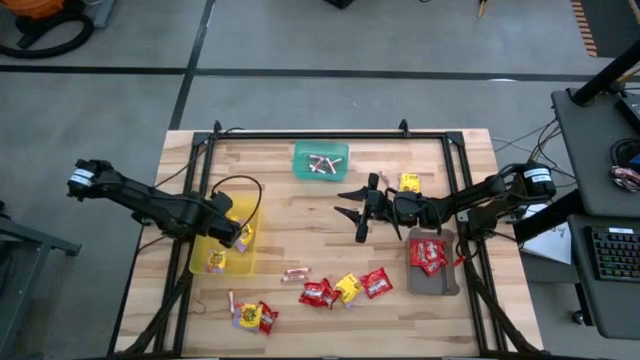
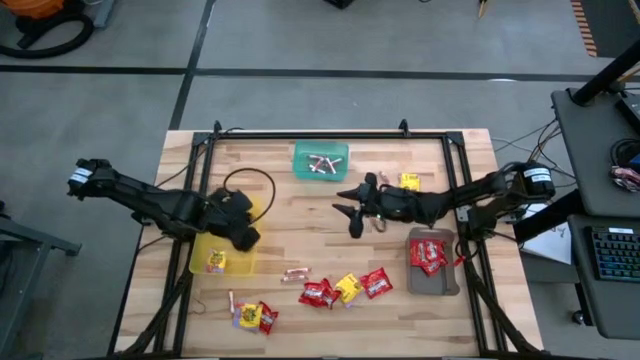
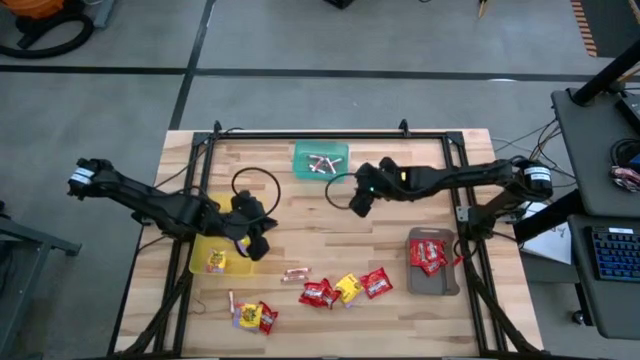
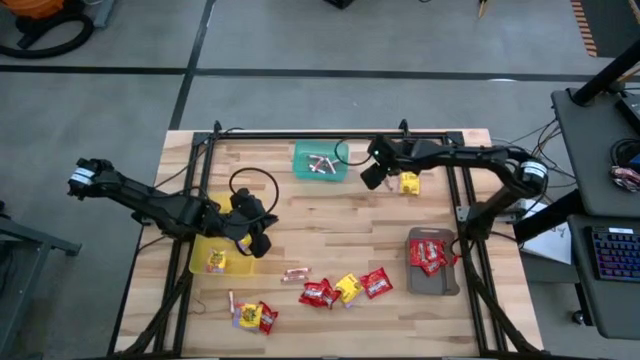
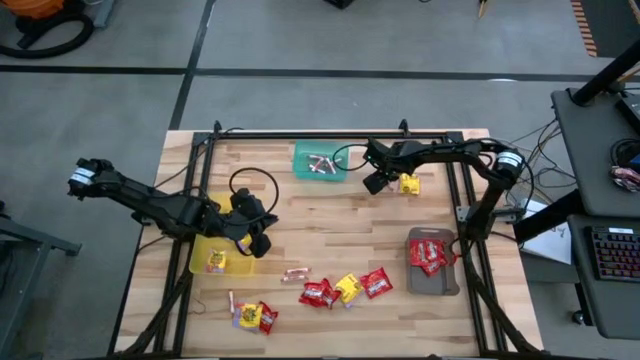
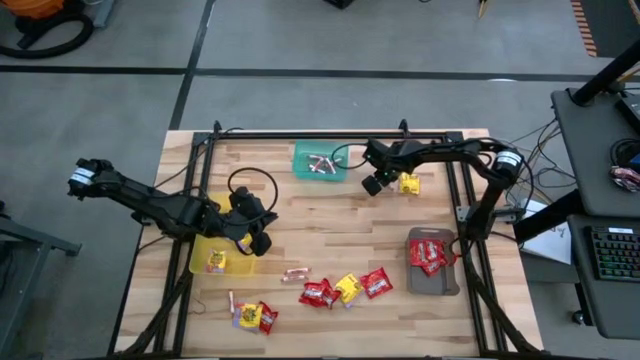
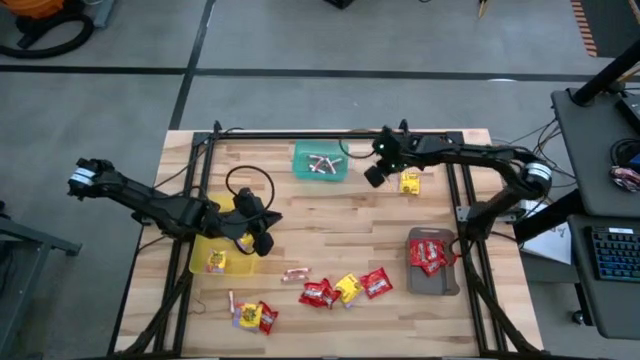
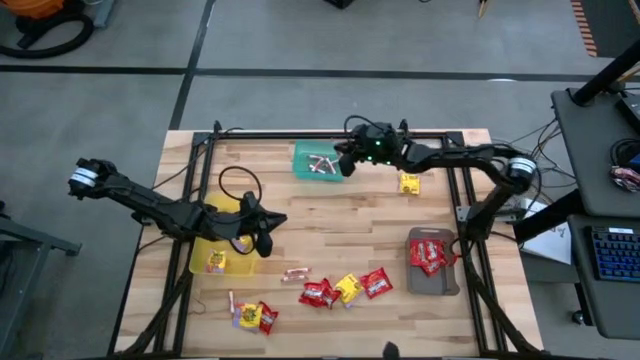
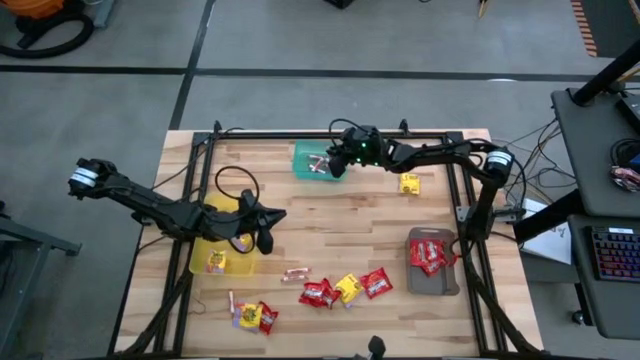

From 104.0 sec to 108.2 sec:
Task: Sort candy
Put the white candy into the green bin

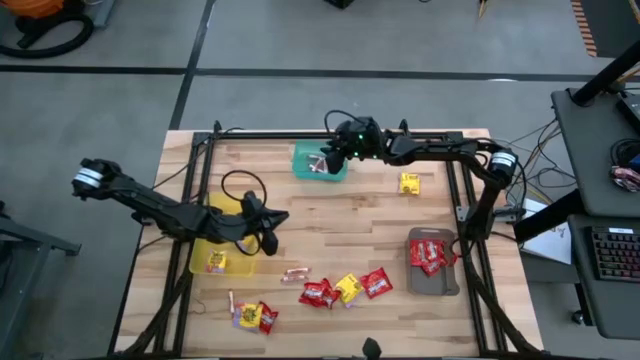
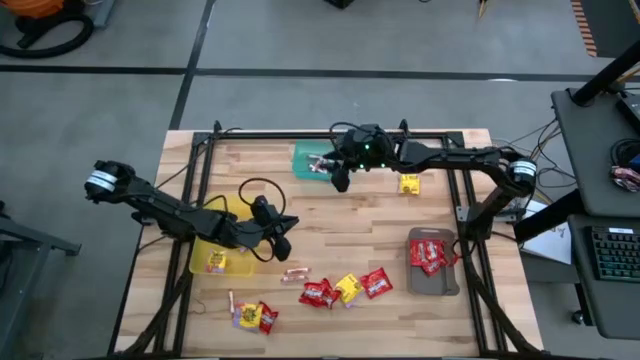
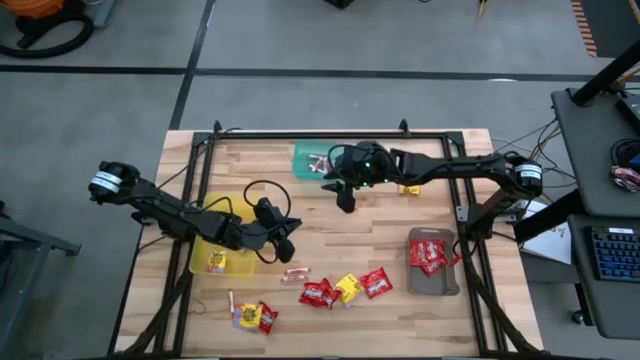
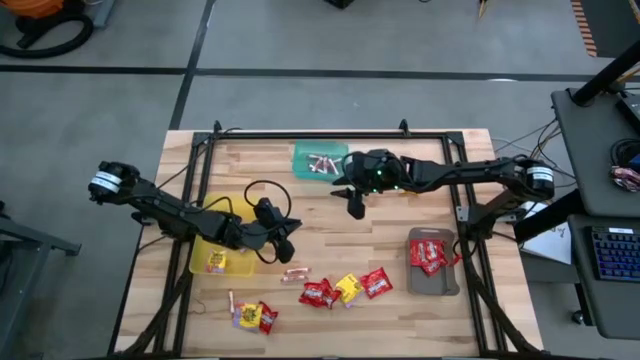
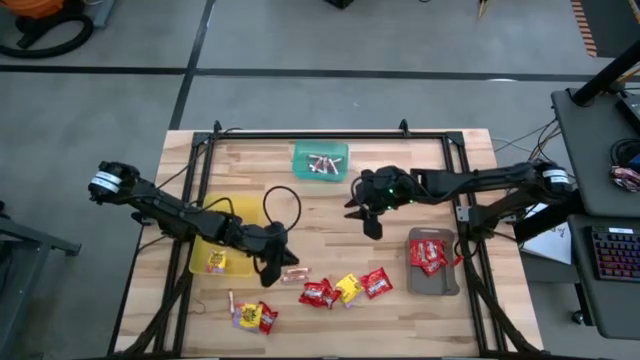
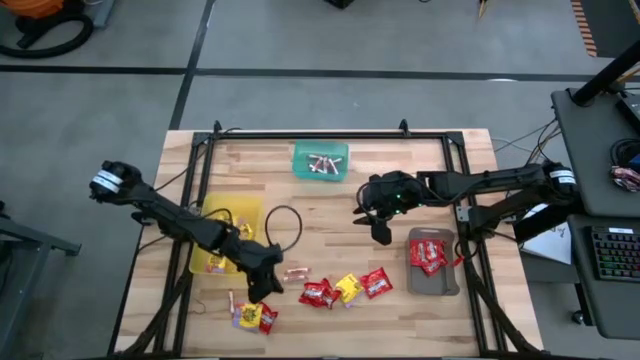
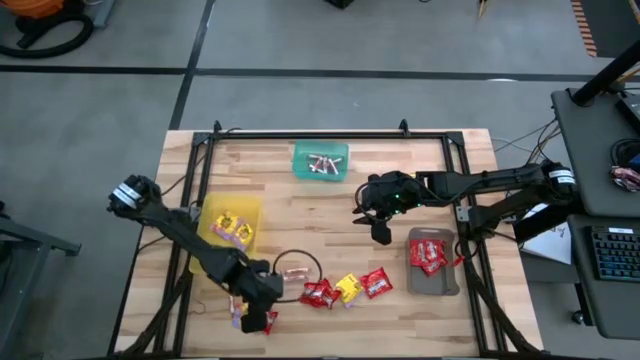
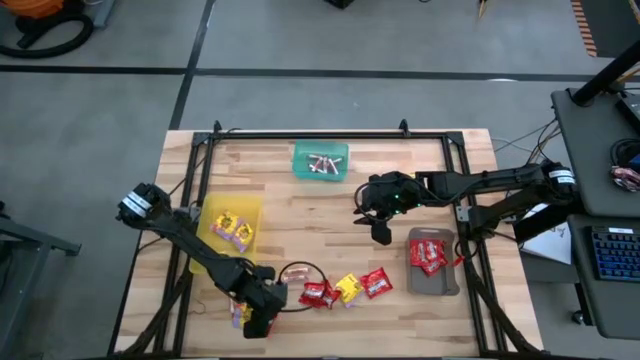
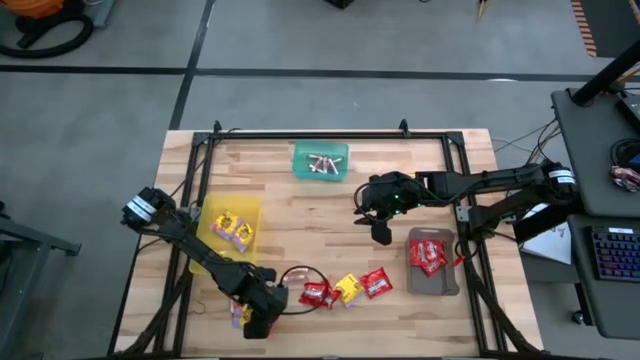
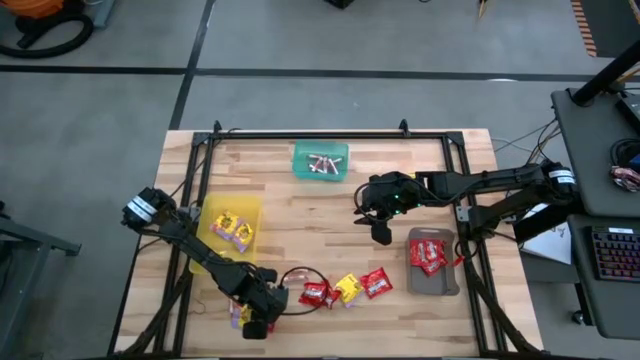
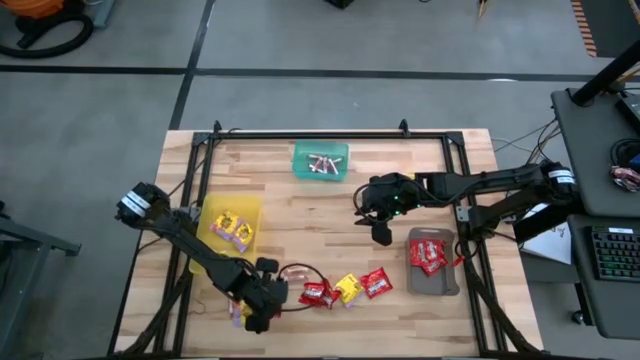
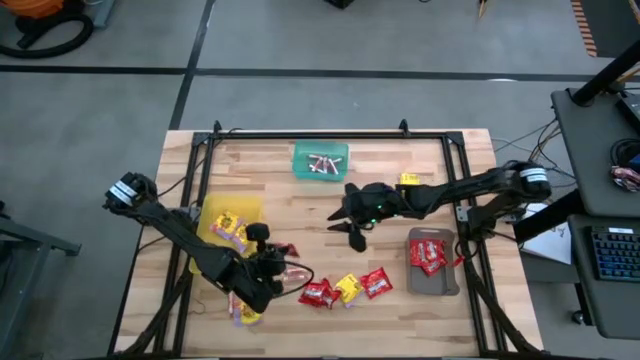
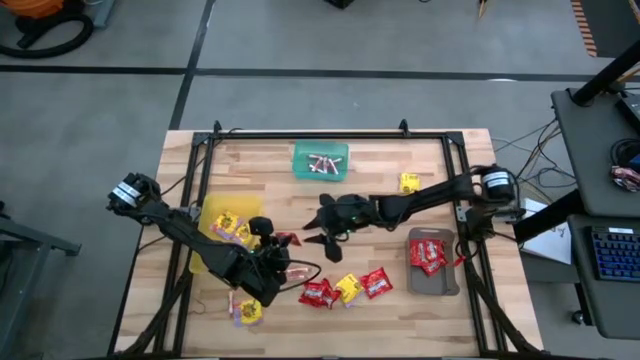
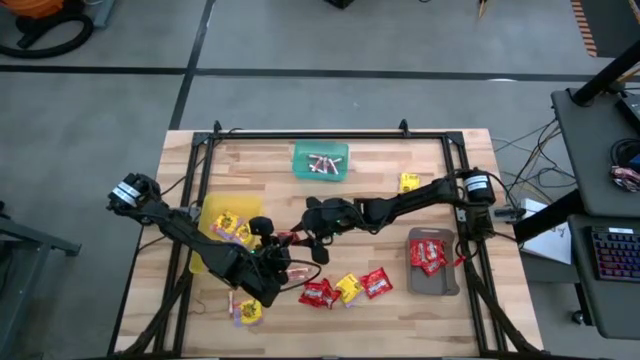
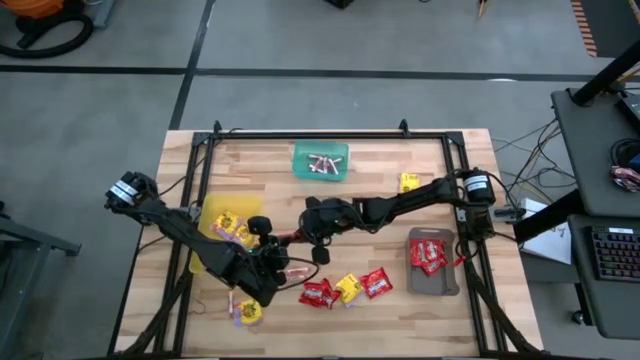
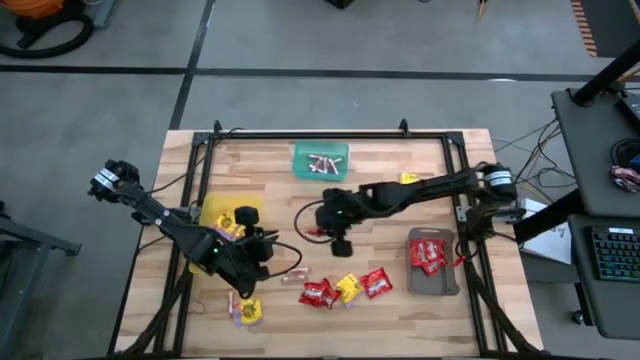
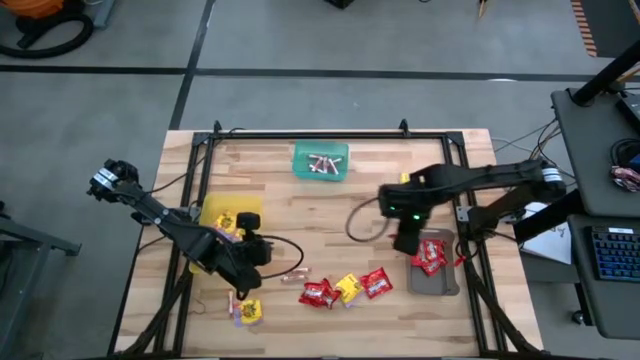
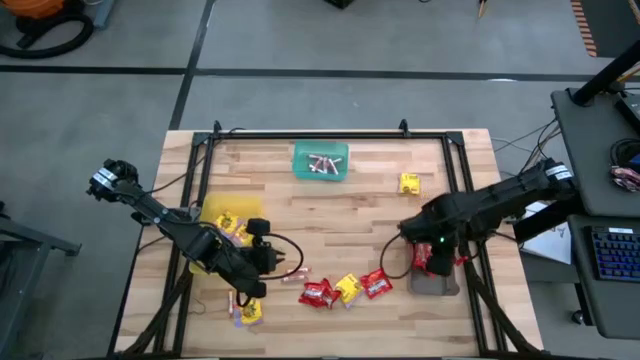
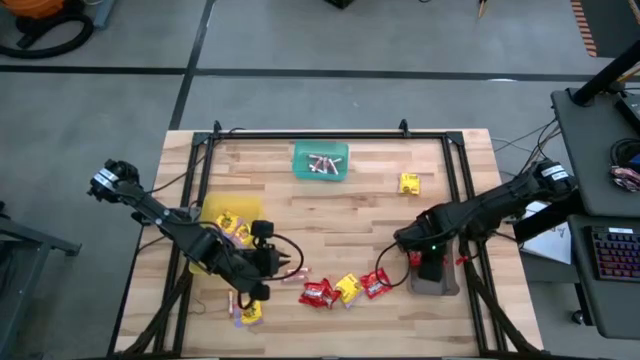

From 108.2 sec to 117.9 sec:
Put the red candy into the black bin

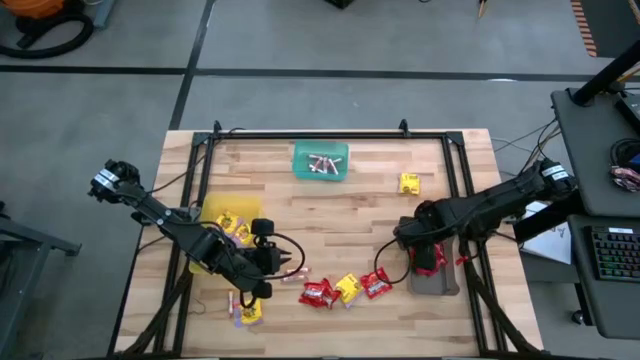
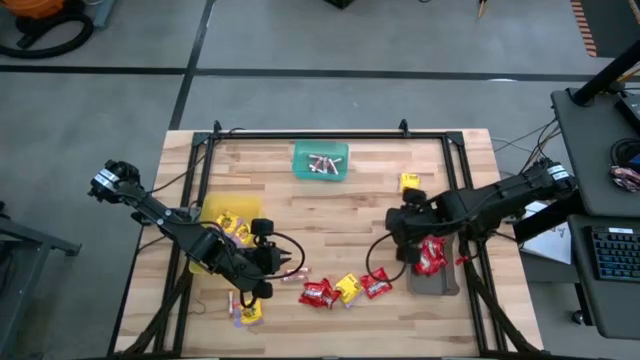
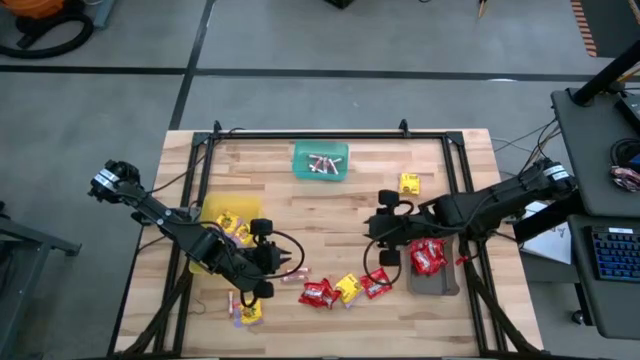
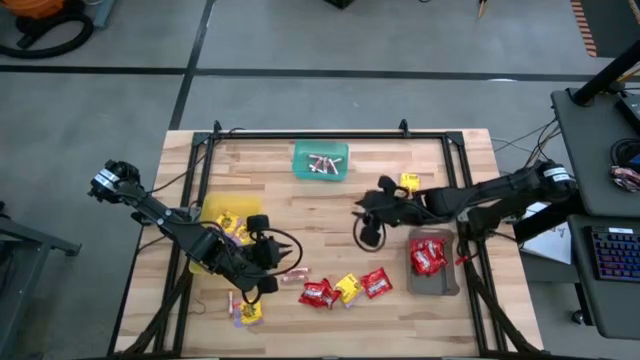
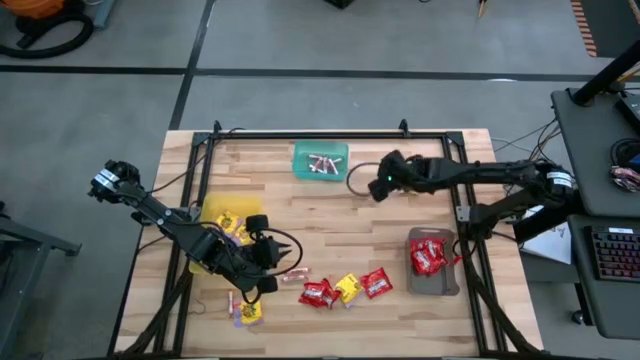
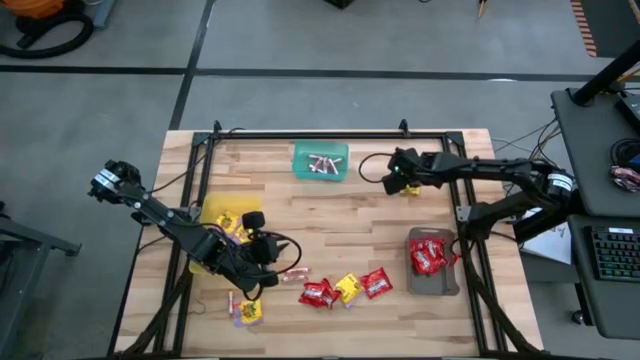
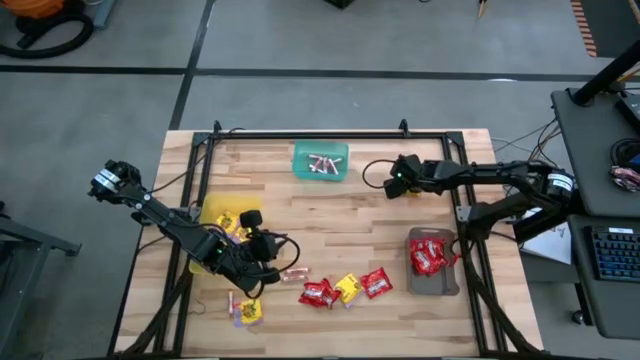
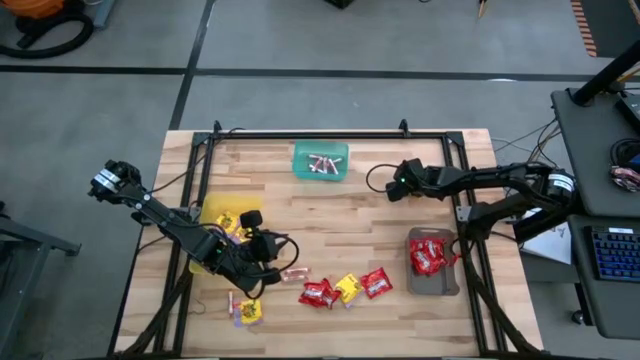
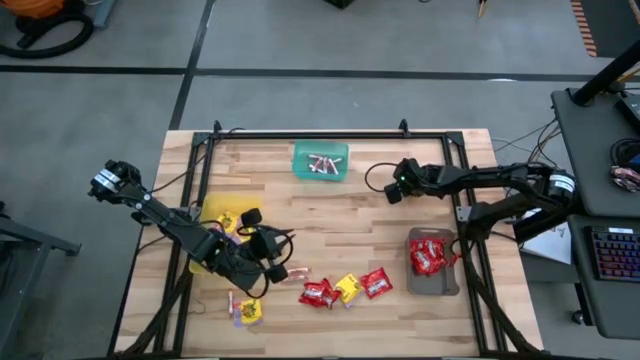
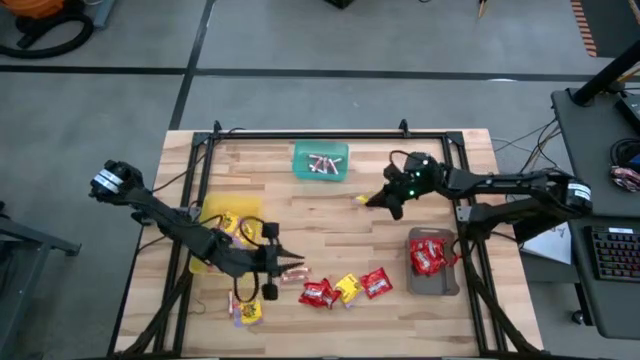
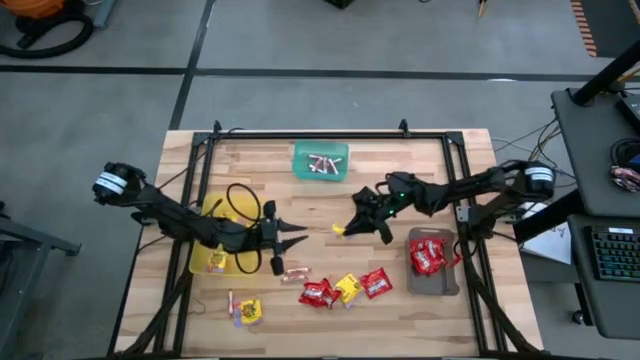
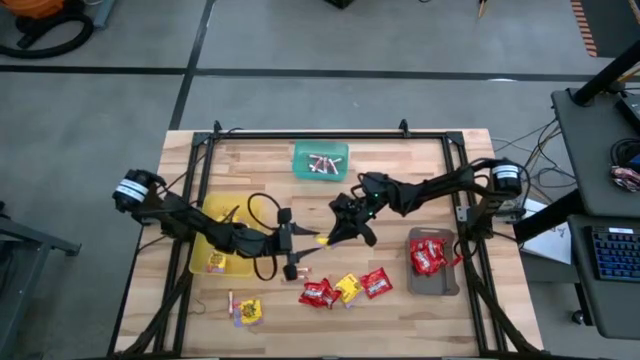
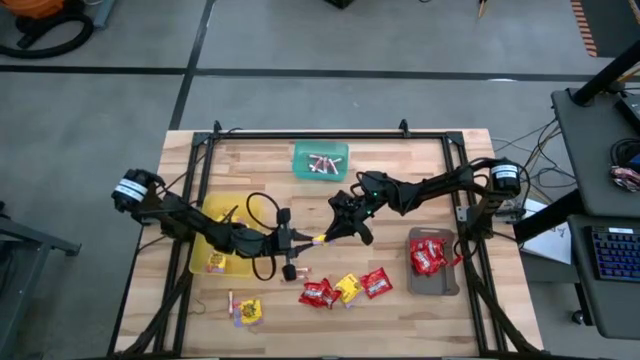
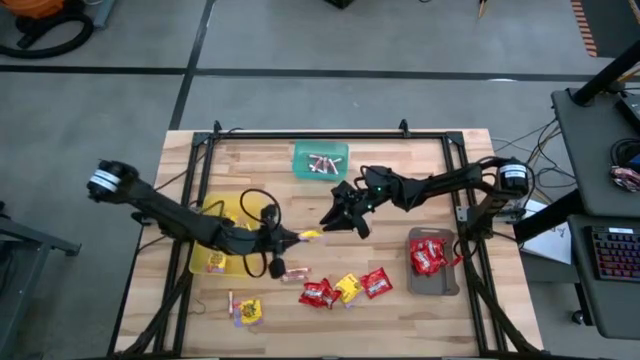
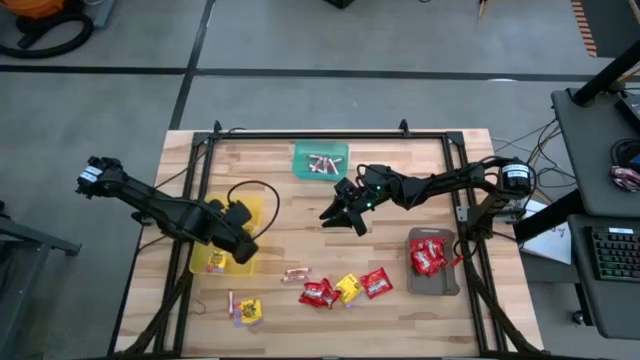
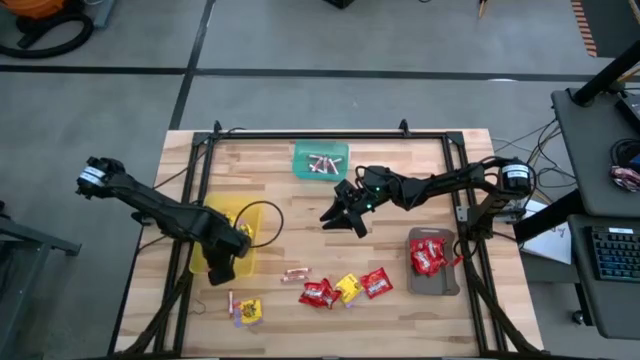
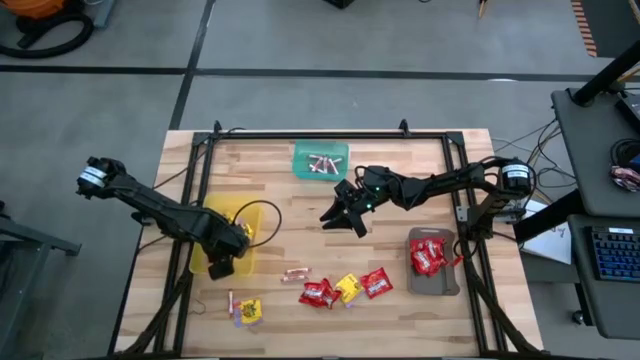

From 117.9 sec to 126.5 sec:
Put the yellow candy into the yellow bin
